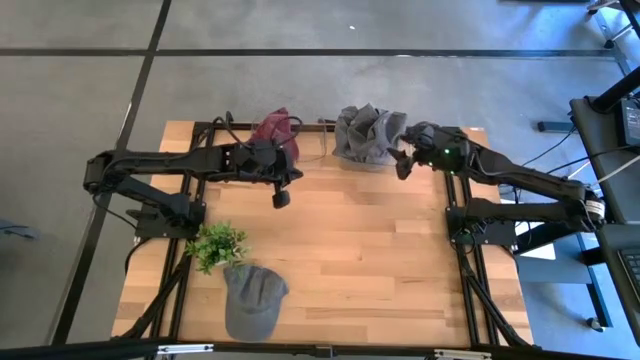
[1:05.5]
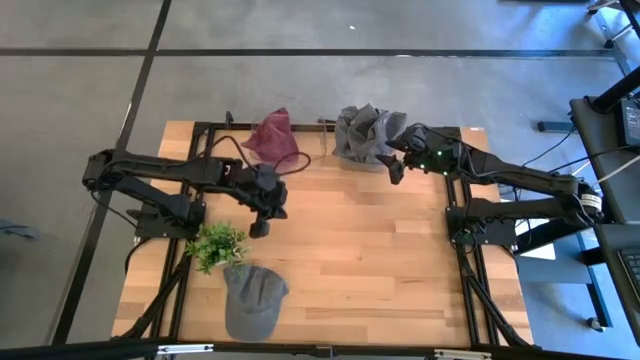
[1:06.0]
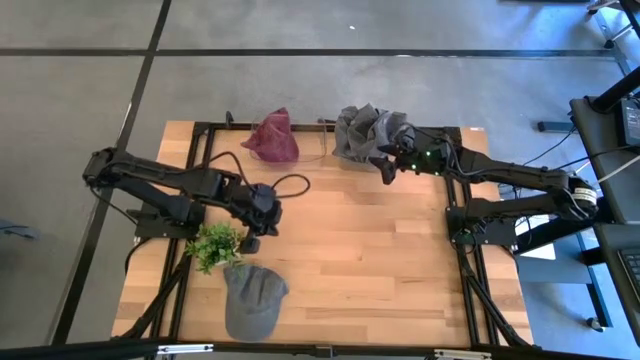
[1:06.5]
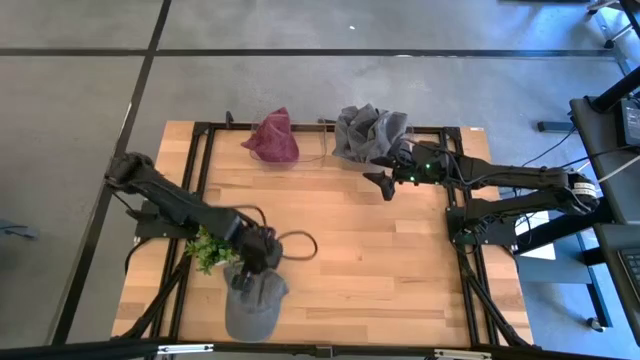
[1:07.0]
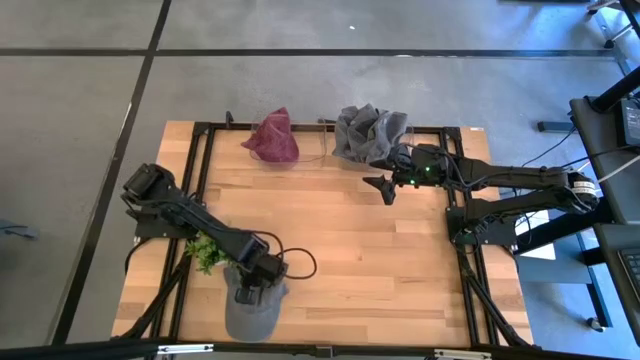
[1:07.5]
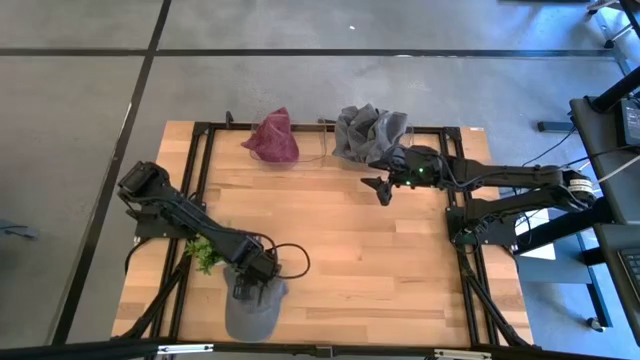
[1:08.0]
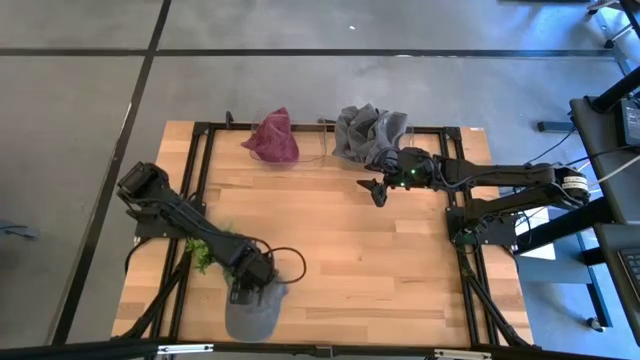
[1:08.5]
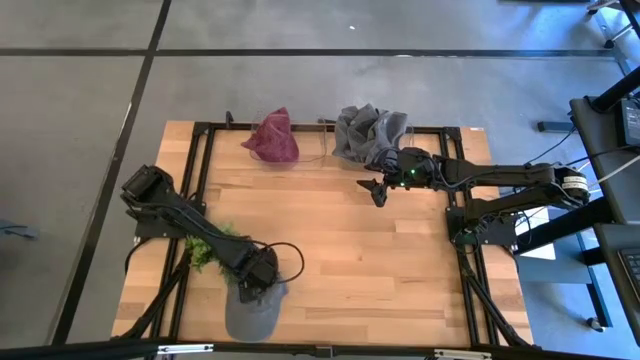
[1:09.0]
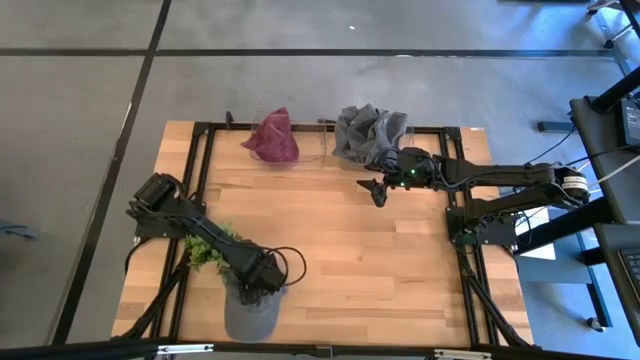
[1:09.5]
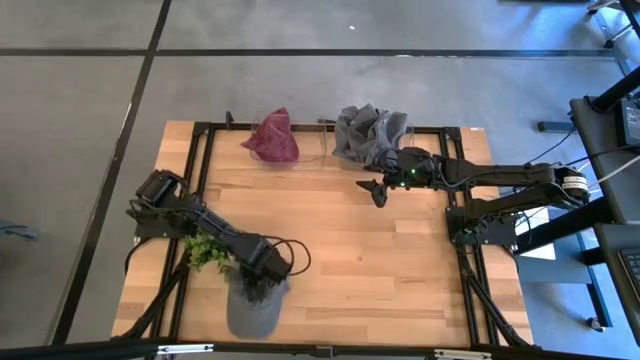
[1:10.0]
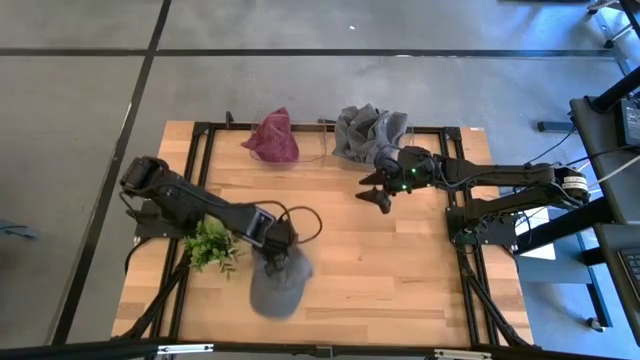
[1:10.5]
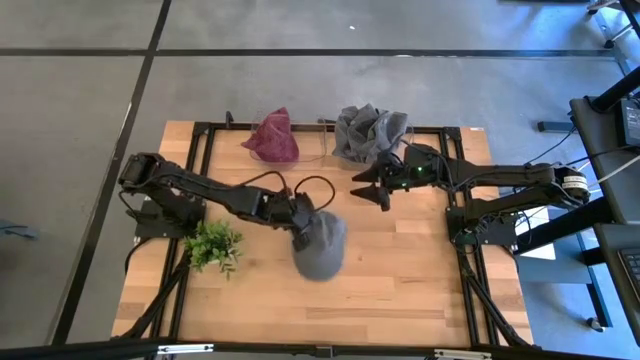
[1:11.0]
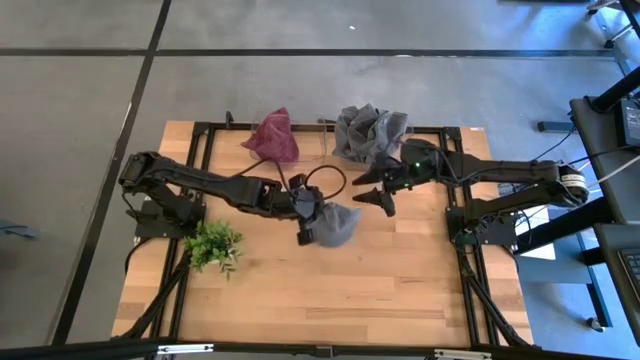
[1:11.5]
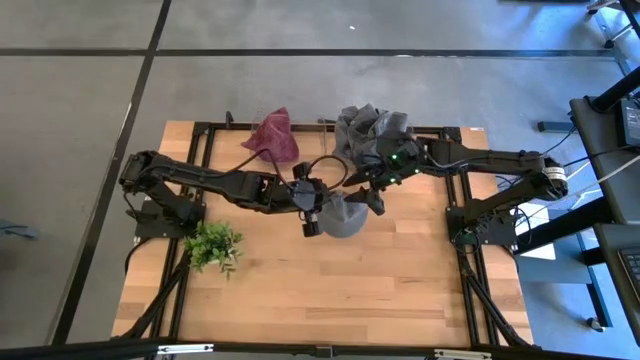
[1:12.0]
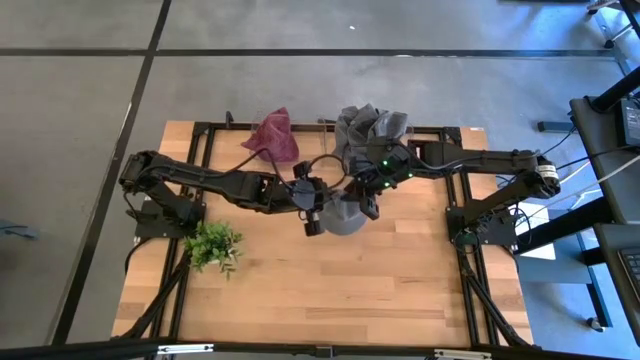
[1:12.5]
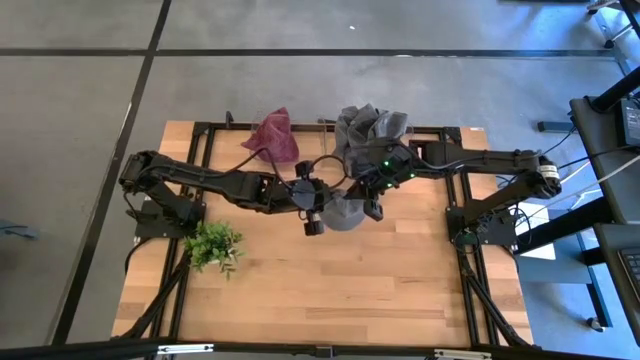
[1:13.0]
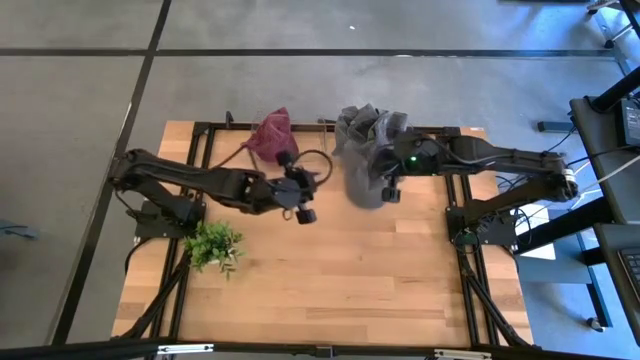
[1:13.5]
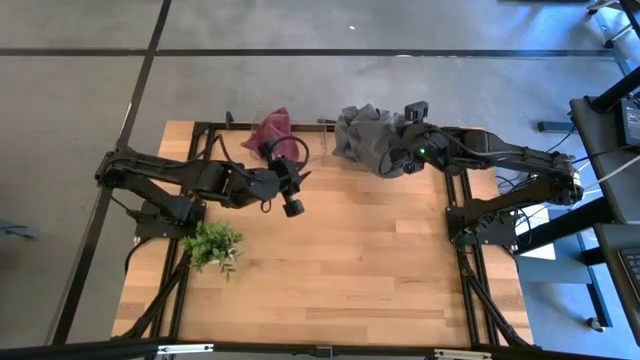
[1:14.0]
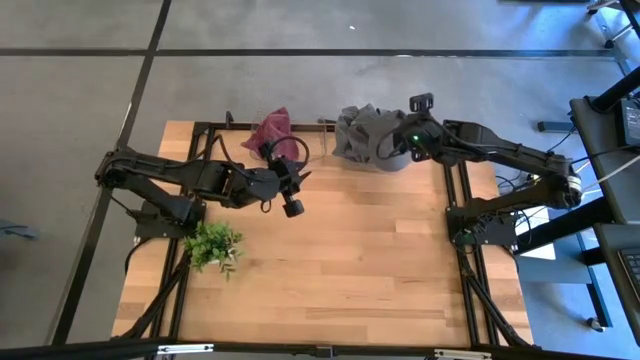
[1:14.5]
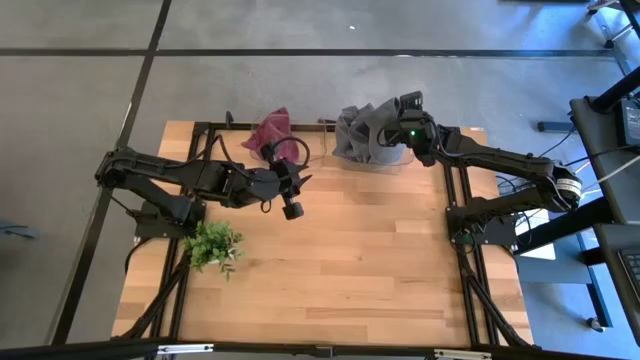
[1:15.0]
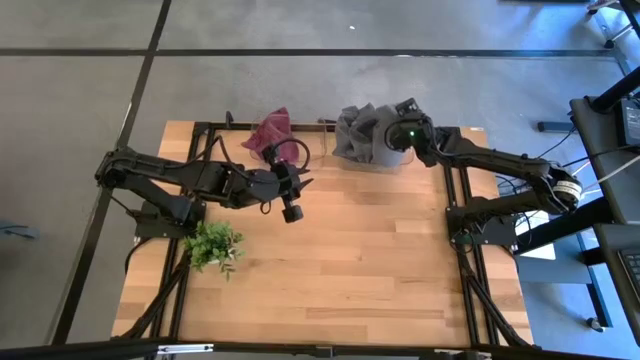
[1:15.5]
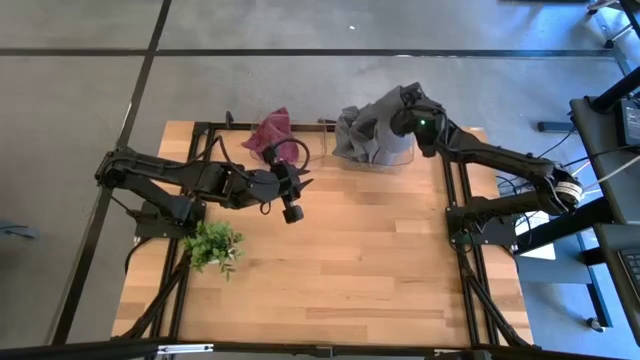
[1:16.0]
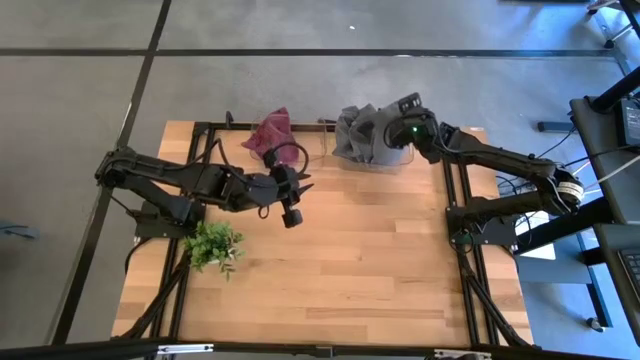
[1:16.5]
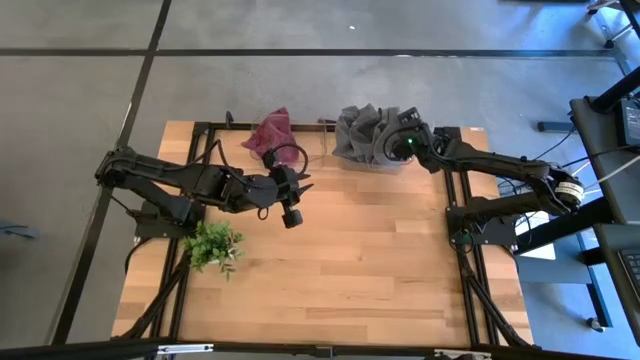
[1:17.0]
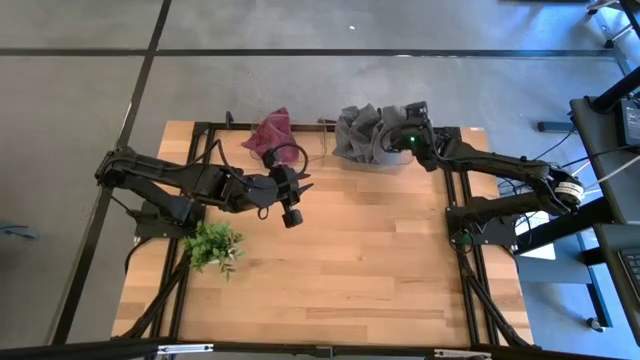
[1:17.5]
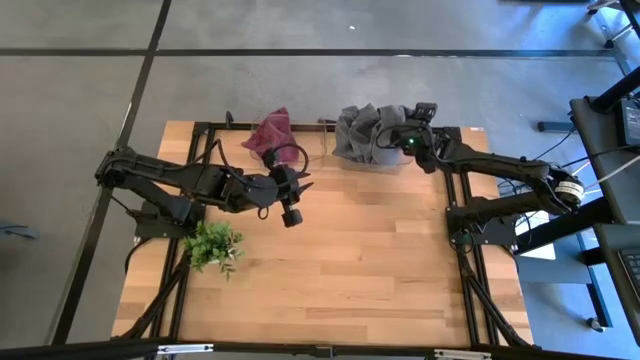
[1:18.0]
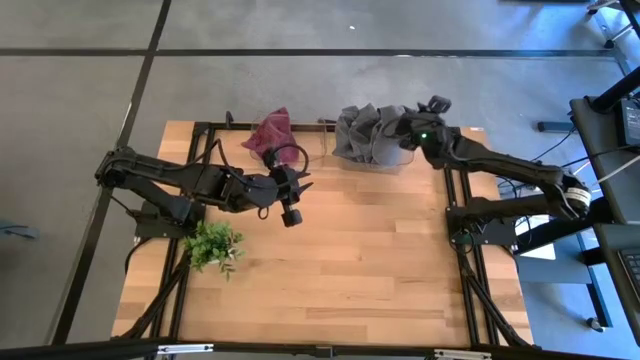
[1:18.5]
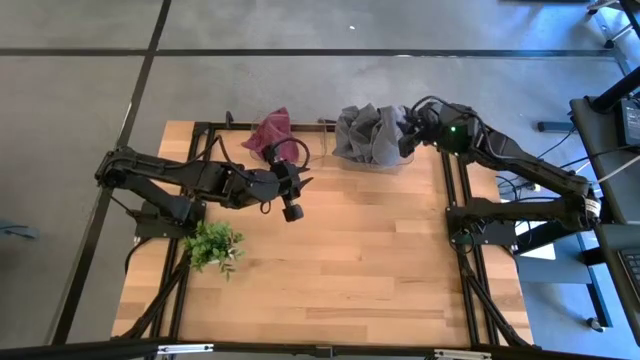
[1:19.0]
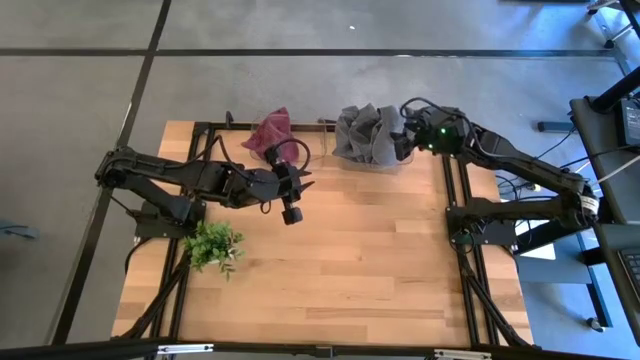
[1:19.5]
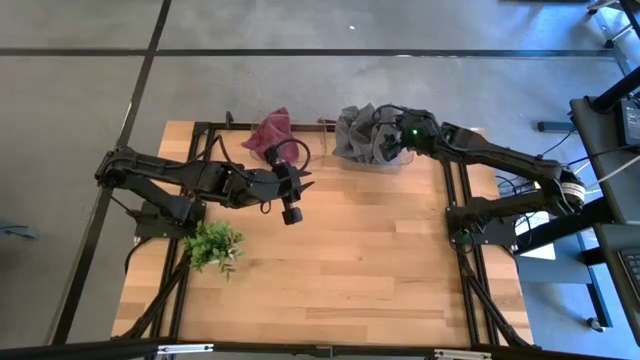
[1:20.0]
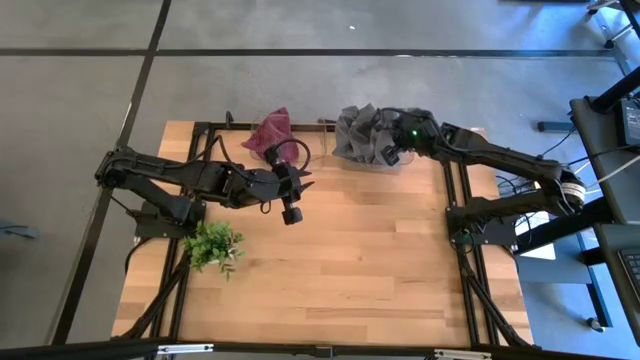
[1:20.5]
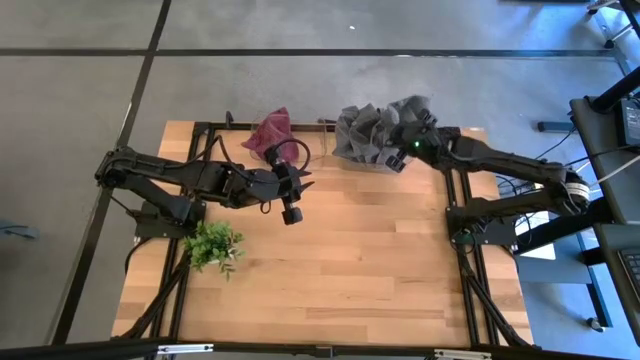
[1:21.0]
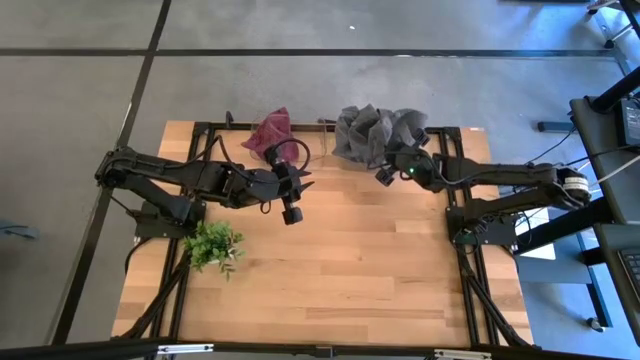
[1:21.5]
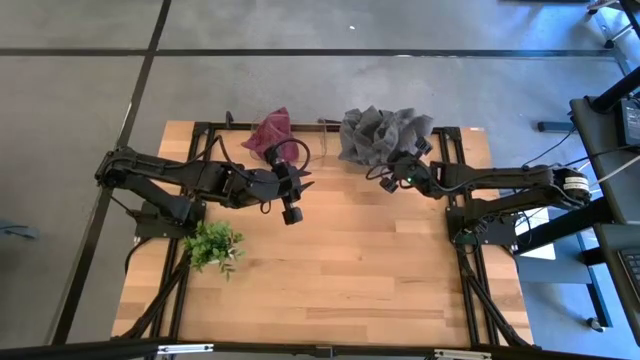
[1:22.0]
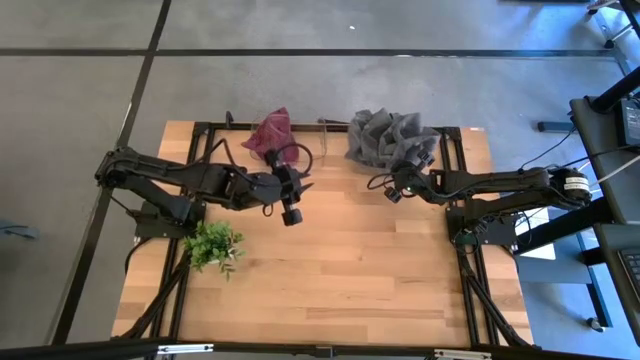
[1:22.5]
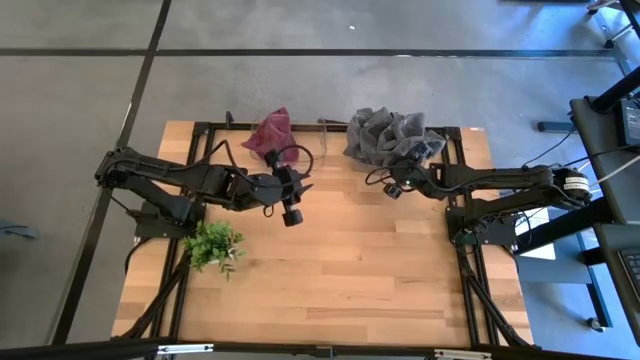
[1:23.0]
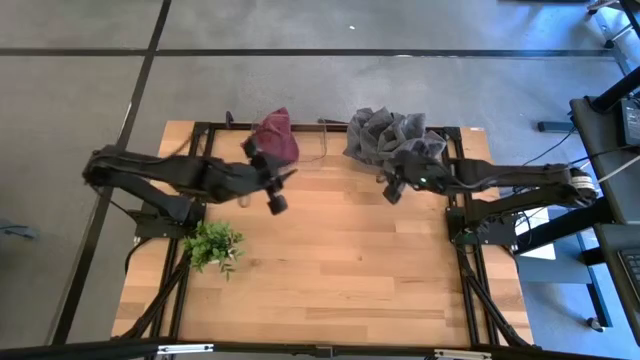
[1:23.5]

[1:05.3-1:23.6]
Task: Pick & Place hat
Put the gray cap into the right transparent bin
